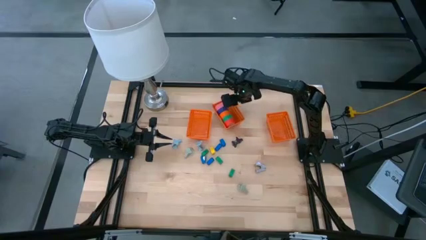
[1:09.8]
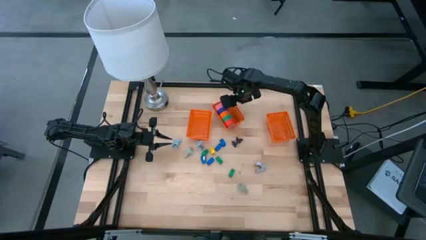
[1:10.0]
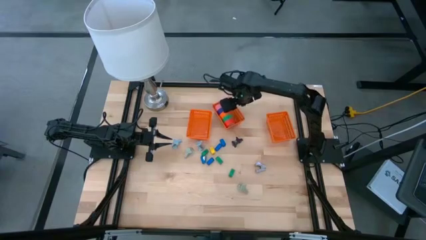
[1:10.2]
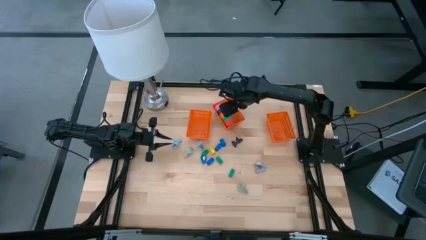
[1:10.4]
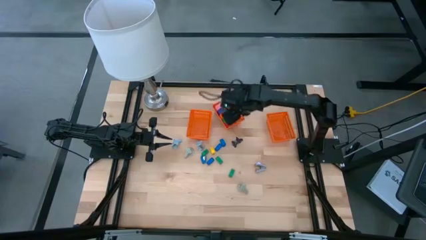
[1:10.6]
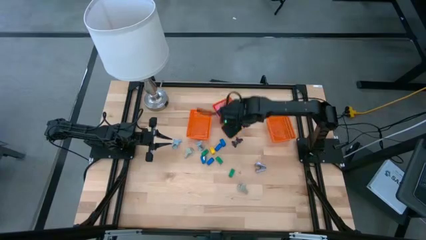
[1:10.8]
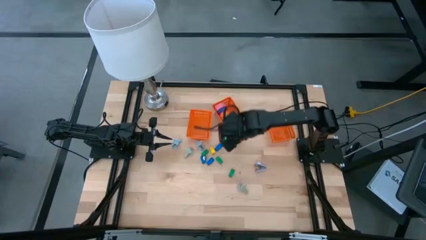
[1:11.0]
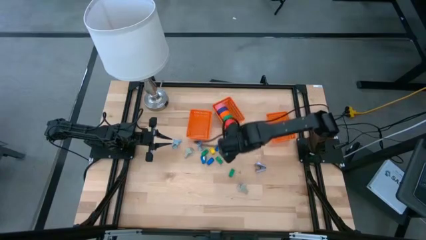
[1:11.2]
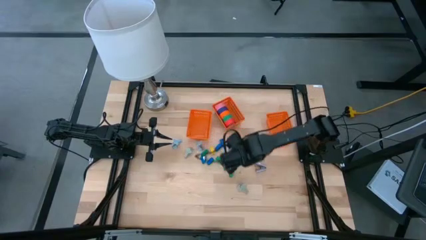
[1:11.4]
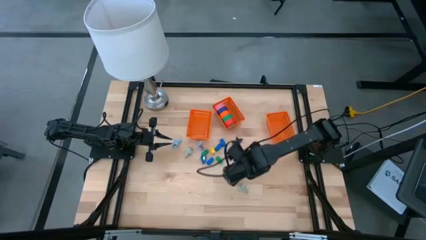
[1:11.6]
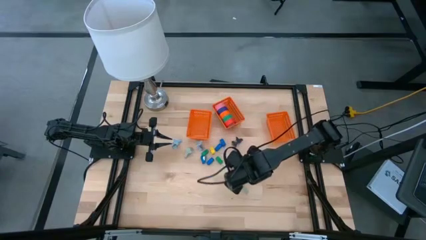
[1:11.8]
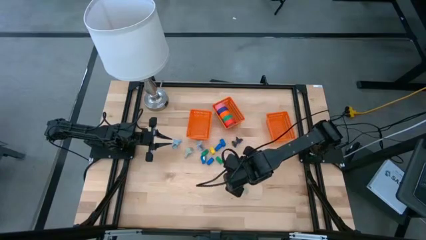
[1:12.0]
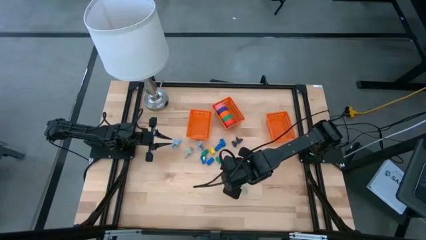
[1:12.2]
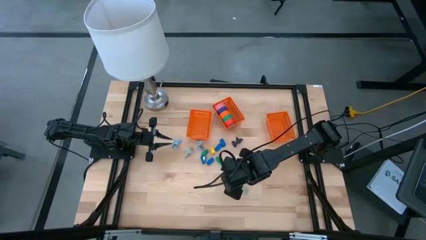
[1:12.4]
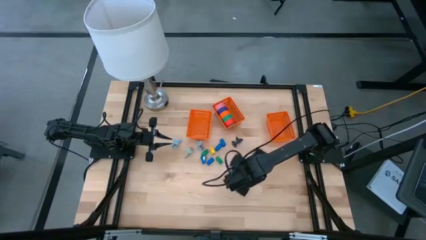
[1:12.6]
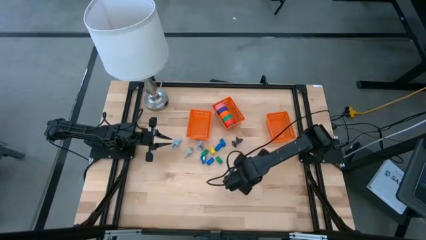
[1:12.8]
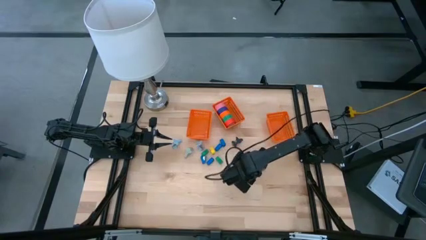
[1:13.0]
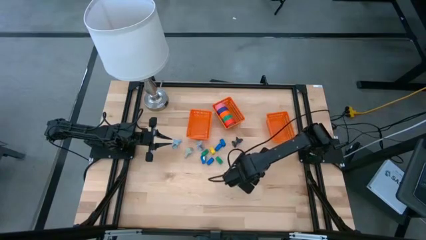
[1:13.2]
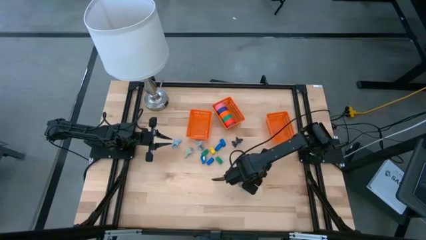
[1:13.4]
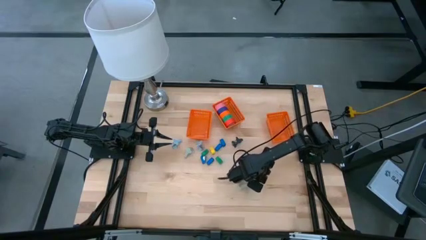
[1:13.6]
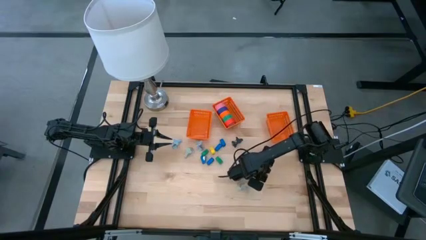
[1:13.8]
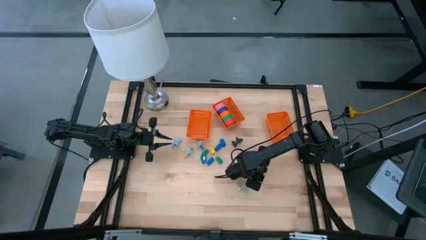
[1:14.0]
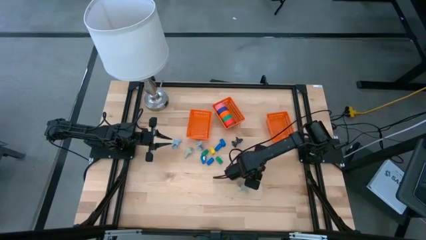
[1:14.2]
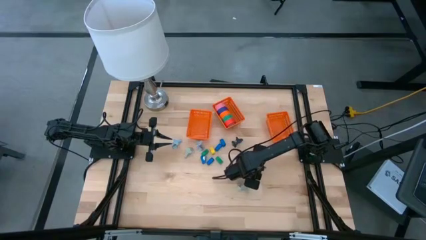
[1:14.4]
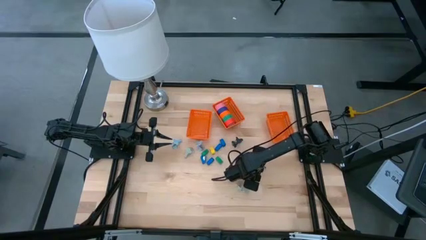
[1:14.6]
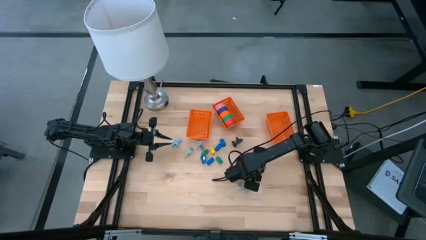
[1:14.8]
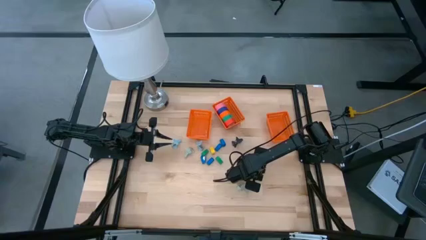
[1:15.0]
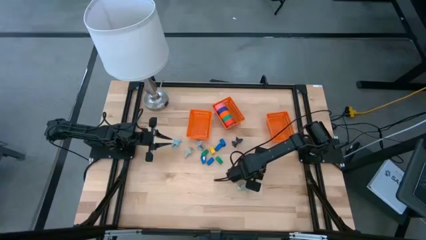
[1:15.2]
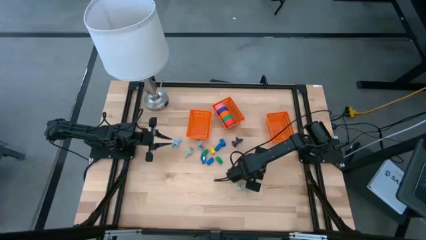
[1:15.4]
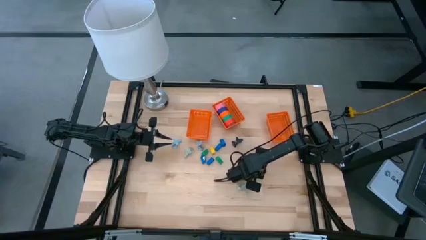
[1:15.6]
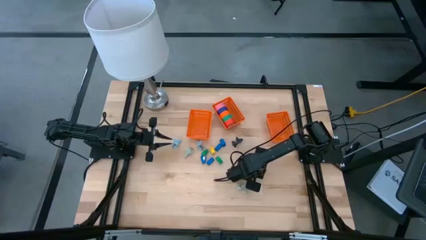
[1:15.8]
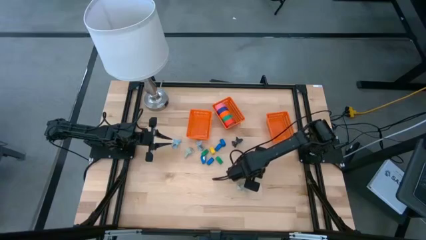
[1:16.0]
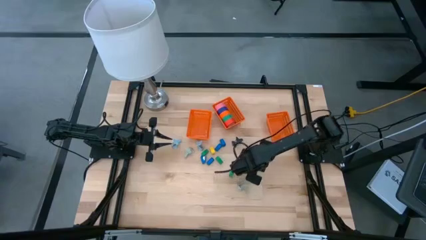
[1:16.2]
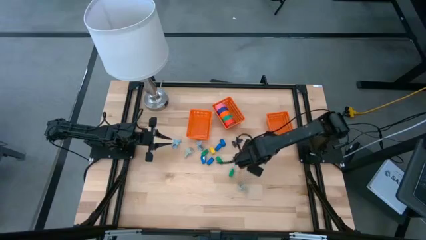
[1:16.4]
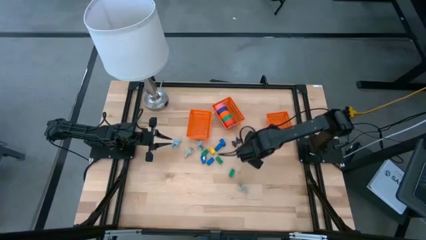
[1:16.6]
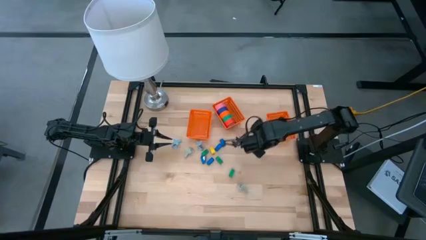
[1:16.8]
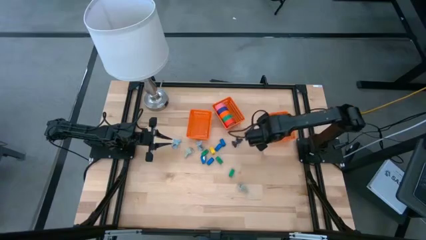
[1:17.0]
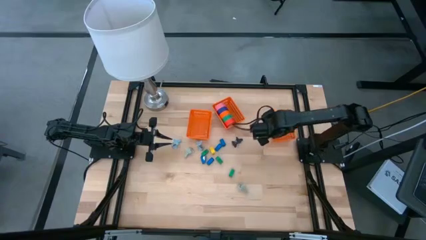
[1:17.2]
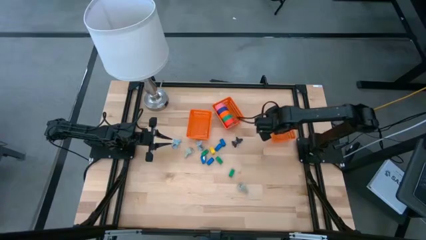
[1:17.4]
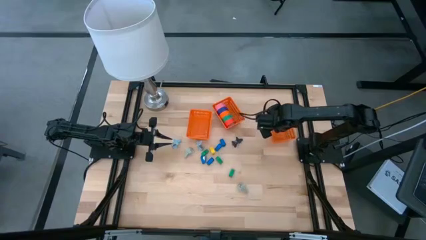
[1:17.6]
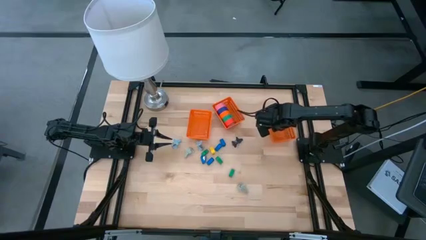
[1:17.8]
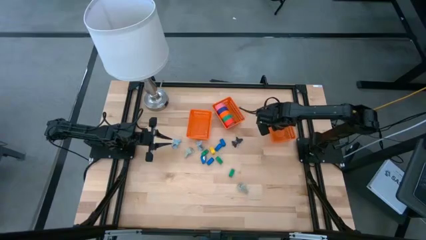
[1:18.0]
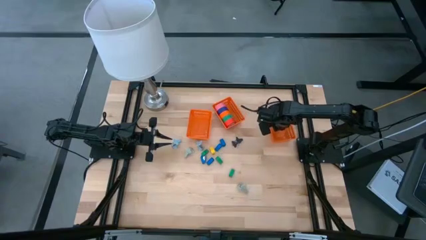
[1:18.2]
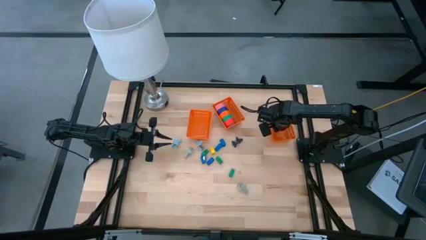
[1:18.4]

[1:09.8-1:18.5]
Task: Pick and place Stapler, Stapler remover, tape
Put the violet staple remover into the right orange bin

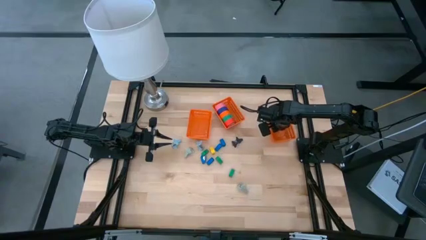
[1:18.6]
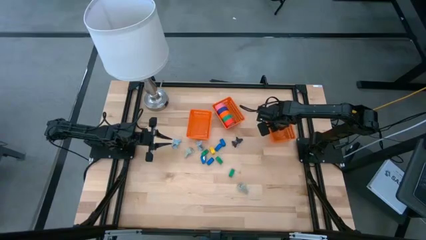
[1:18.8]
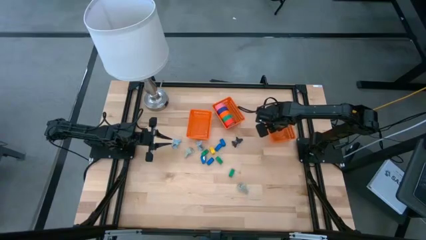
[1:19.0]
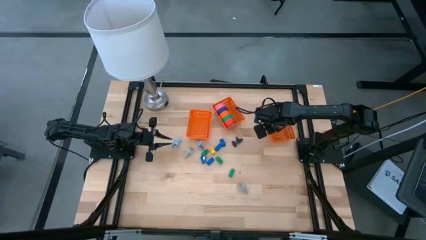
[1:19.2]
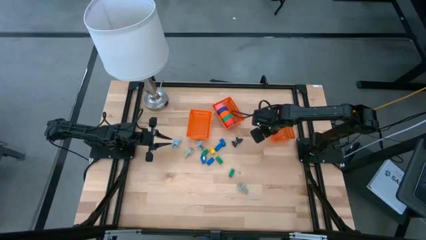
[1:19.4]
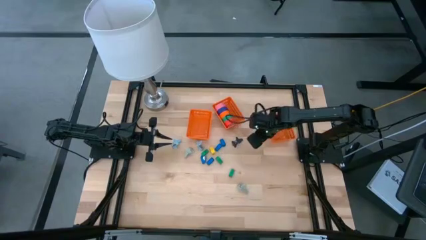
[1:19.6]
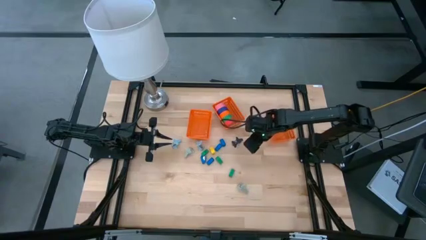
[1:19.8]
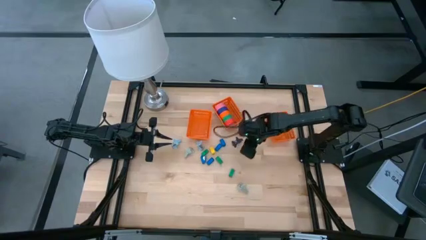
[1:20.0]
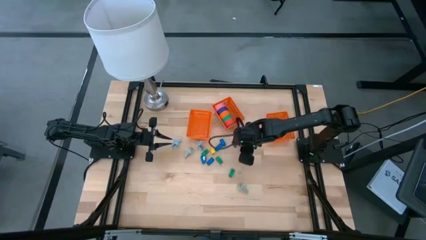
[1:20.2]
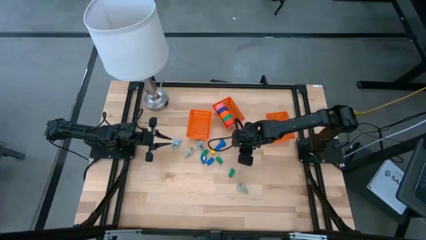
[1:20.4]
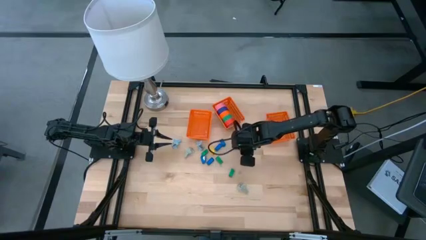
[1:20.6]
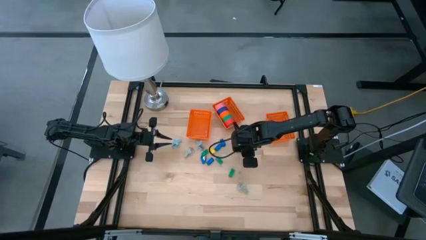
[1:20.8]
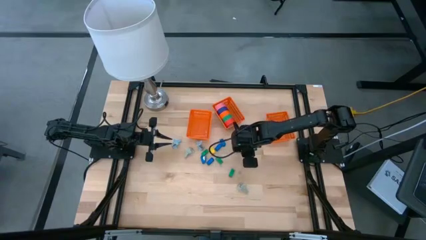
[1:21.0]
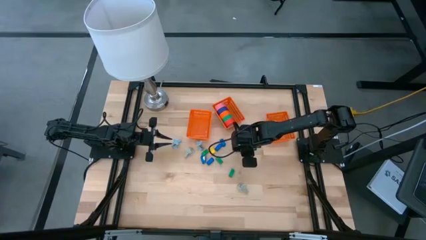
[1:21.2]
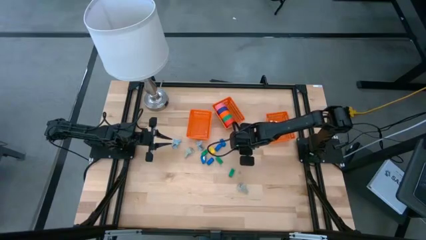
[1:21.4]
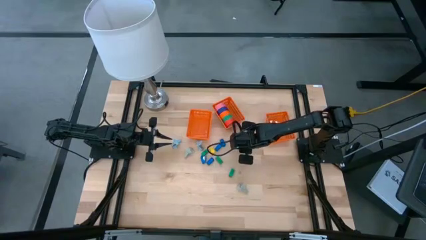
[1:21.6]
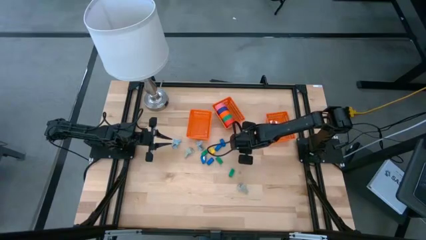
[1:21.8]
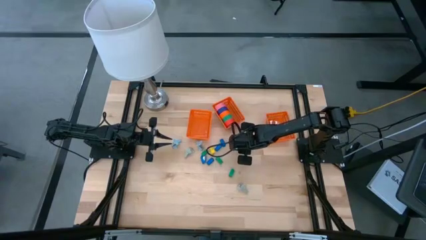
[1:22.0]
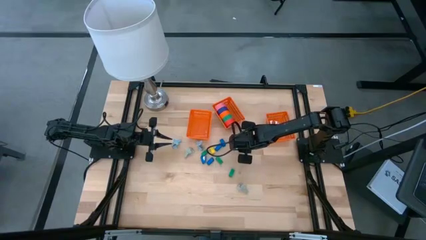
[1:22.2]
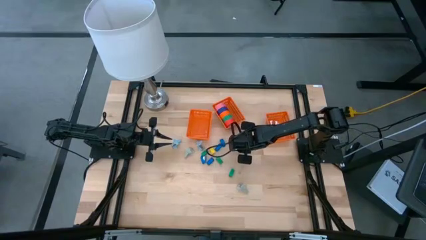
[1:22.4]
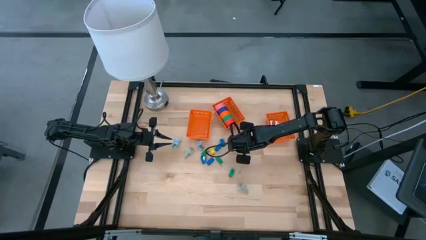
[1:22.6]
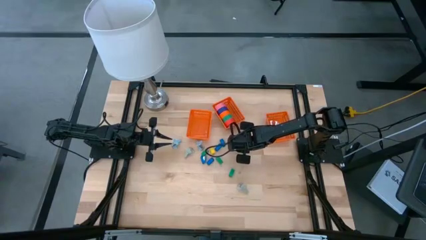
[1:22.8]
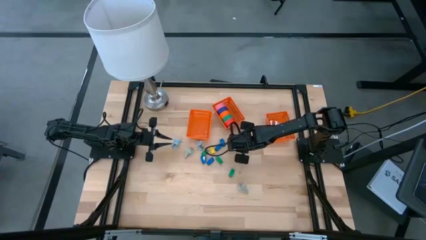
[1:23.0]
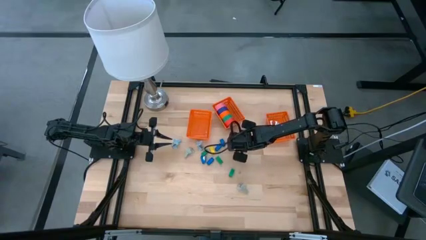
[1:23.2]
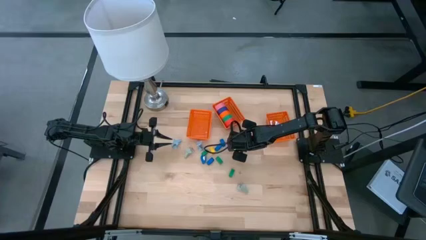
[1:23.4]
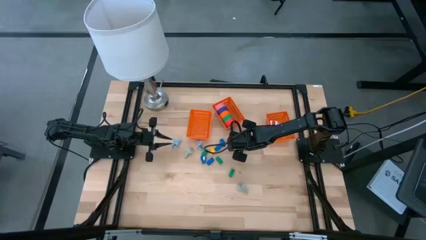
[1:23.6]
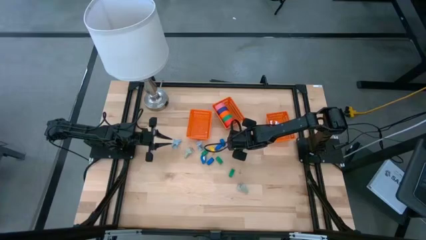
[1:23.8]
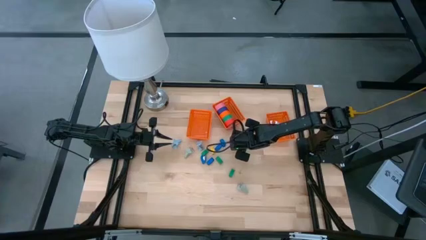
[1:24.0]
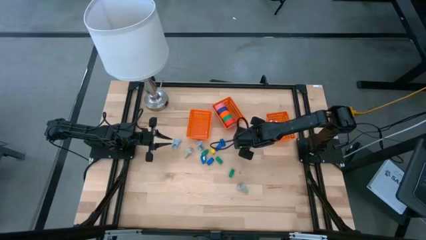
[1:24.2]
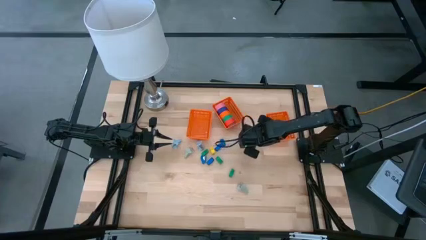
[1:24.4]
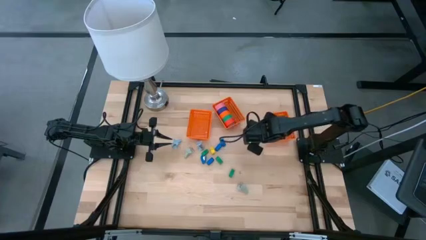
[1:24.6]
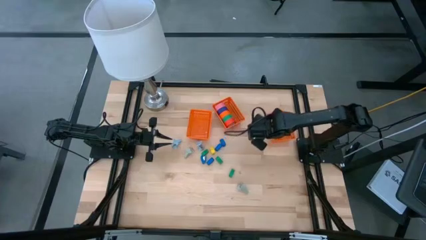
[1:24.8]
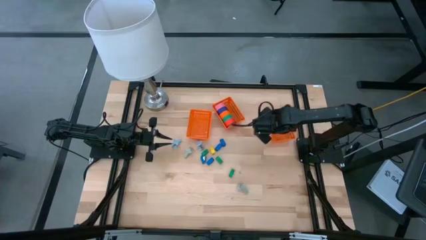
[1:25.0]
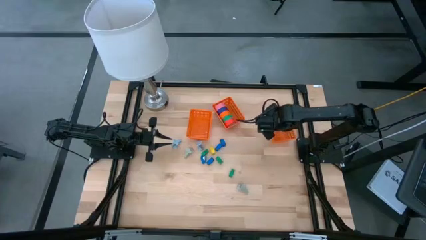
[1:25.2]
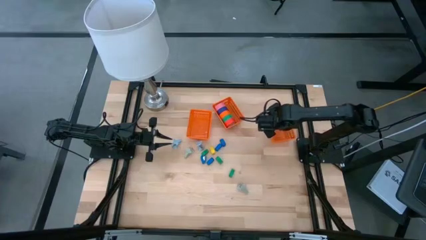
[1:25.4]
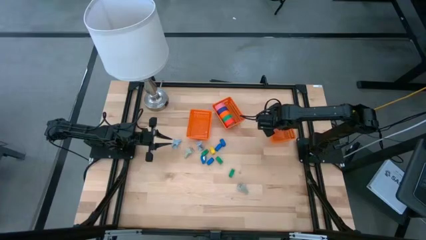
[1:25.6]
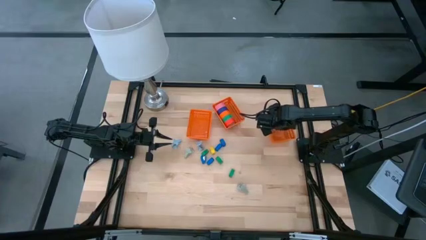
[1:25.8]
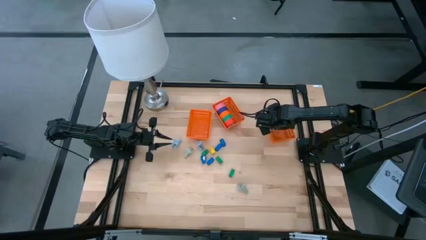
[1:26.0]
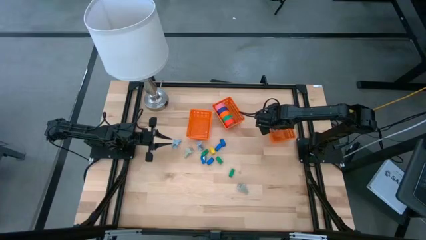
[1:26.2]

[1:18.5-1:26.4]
Put the black staple remover into the right orange bin
